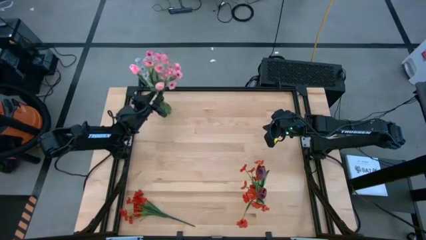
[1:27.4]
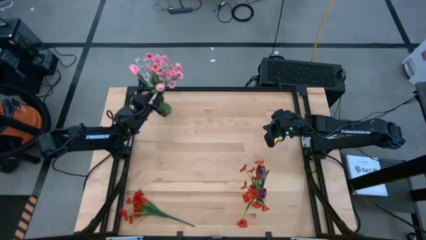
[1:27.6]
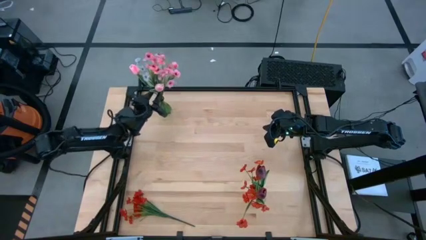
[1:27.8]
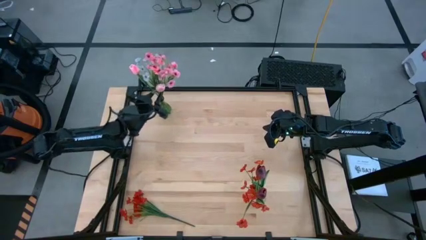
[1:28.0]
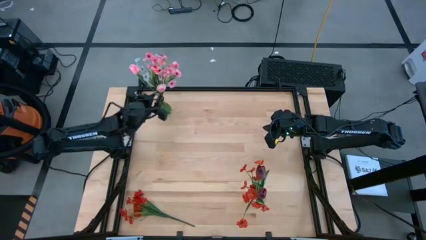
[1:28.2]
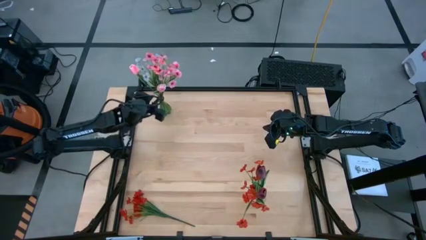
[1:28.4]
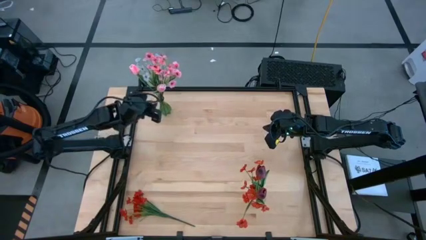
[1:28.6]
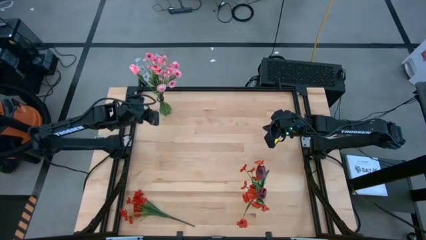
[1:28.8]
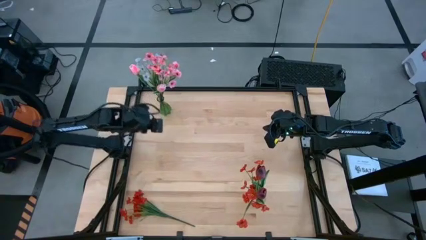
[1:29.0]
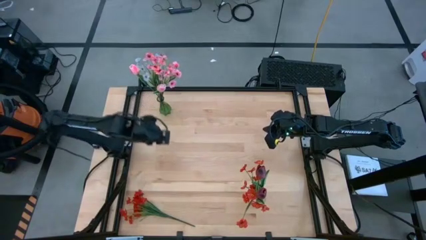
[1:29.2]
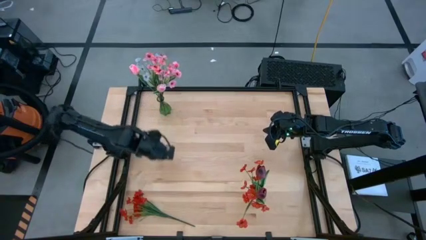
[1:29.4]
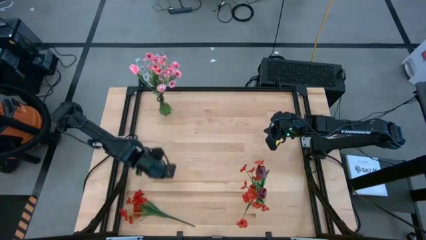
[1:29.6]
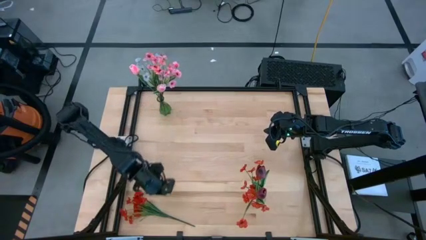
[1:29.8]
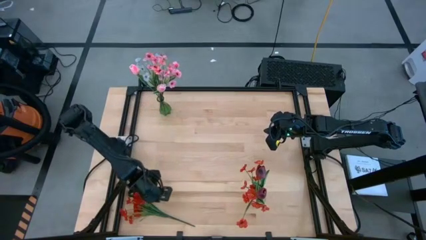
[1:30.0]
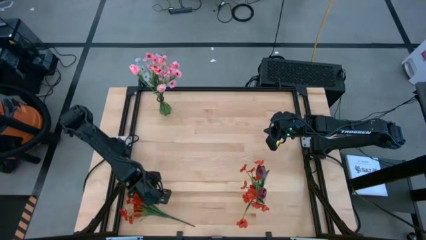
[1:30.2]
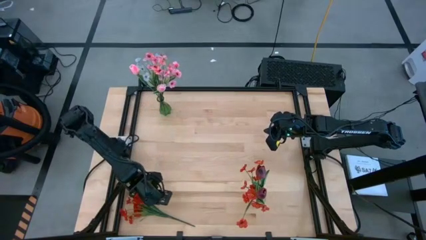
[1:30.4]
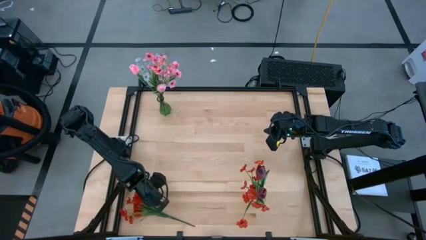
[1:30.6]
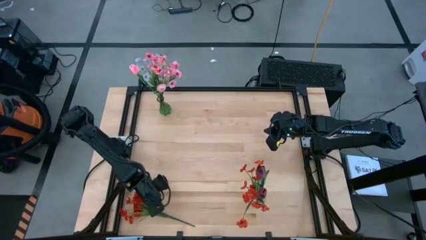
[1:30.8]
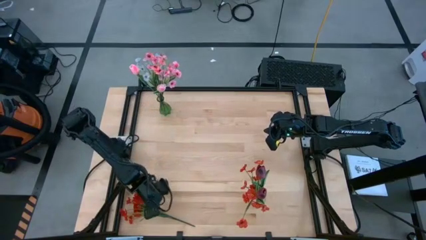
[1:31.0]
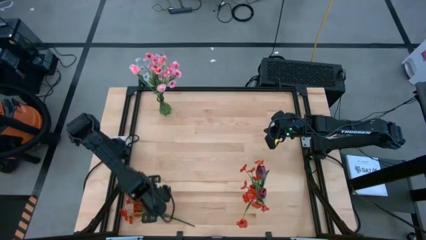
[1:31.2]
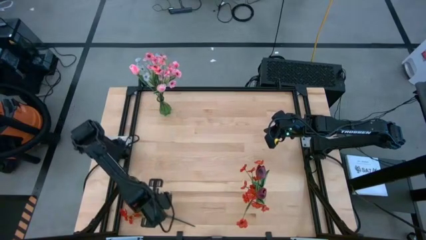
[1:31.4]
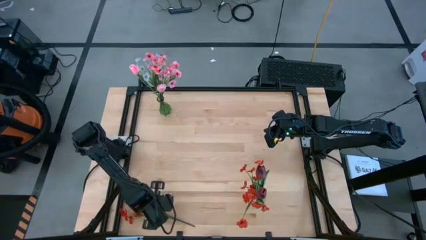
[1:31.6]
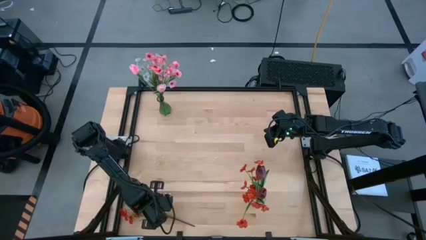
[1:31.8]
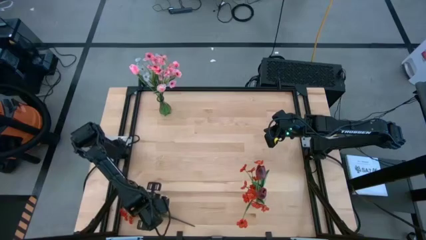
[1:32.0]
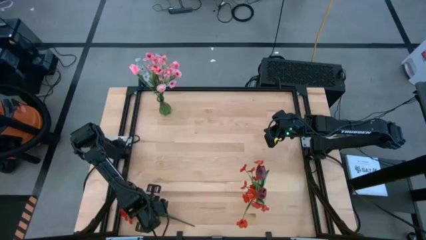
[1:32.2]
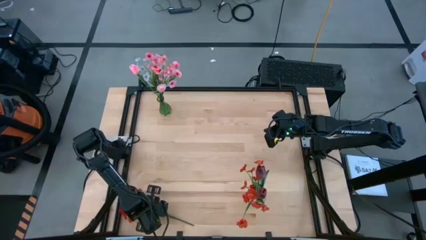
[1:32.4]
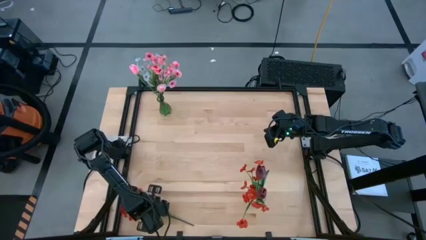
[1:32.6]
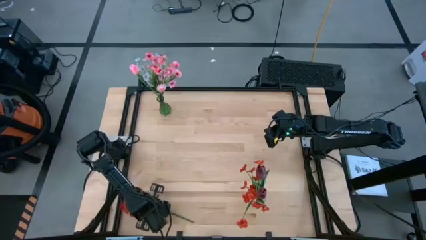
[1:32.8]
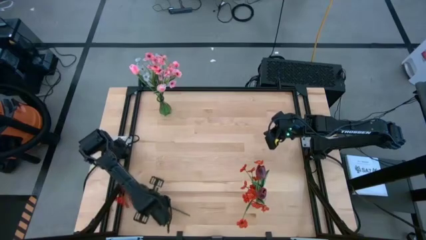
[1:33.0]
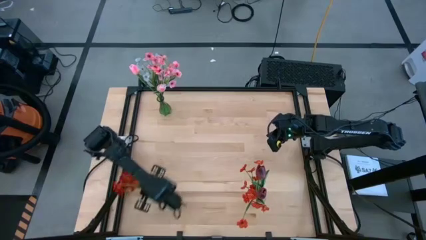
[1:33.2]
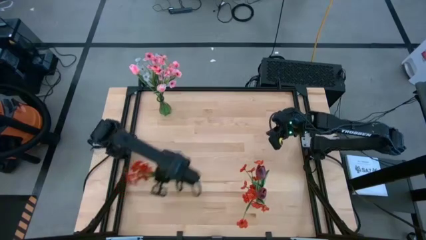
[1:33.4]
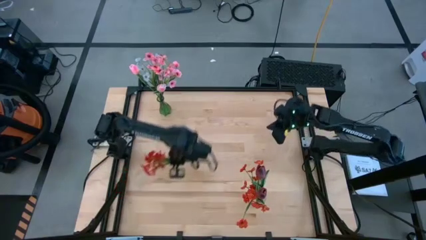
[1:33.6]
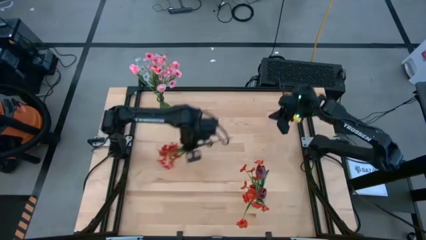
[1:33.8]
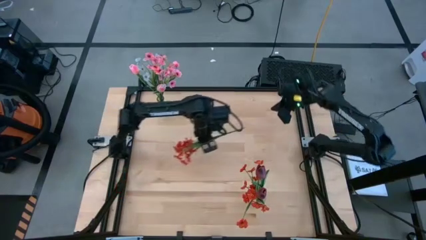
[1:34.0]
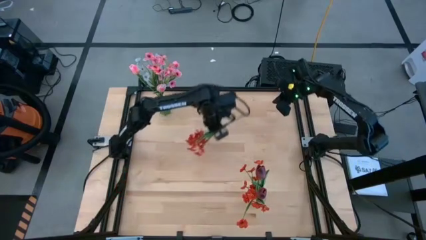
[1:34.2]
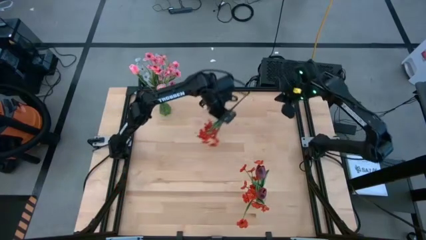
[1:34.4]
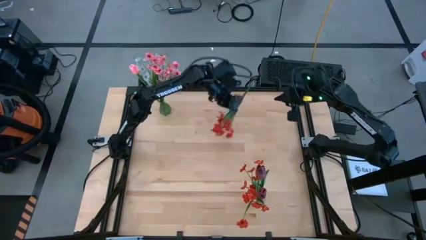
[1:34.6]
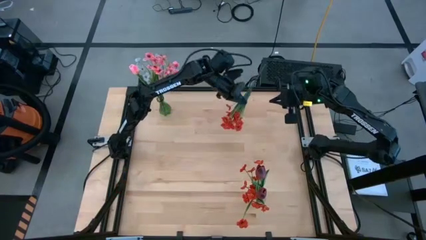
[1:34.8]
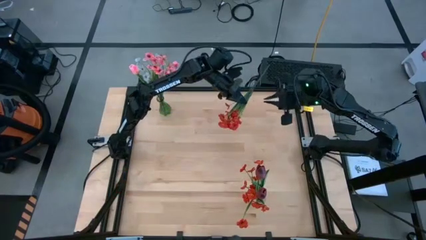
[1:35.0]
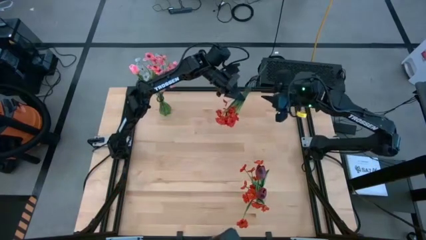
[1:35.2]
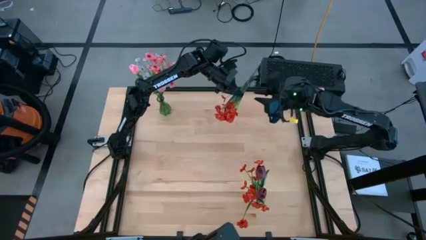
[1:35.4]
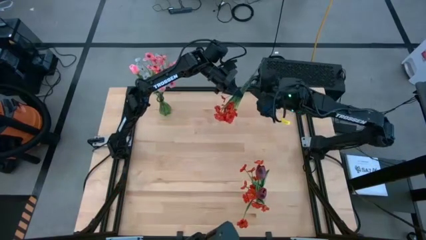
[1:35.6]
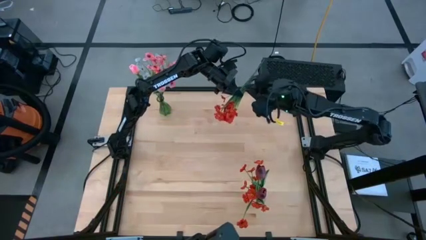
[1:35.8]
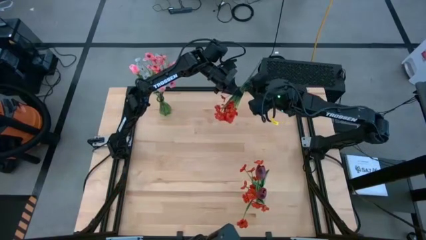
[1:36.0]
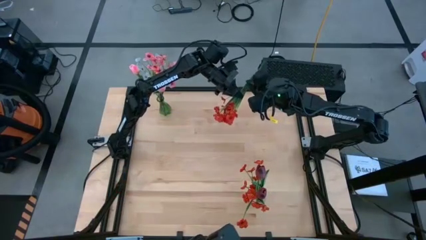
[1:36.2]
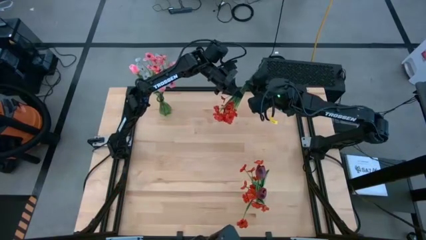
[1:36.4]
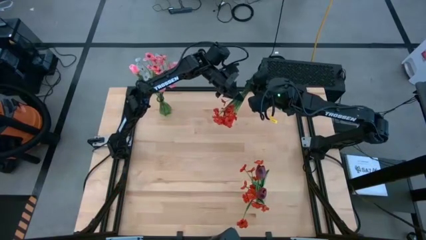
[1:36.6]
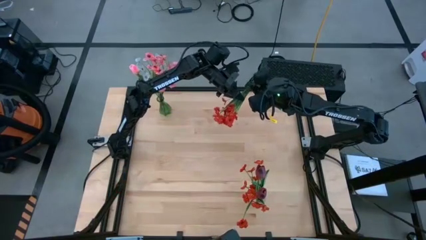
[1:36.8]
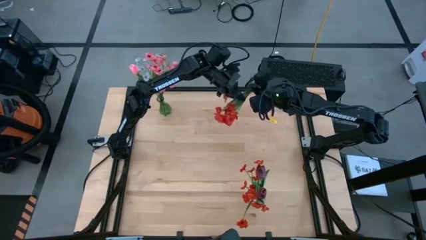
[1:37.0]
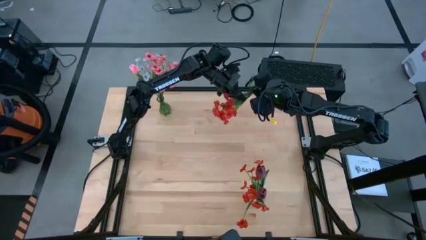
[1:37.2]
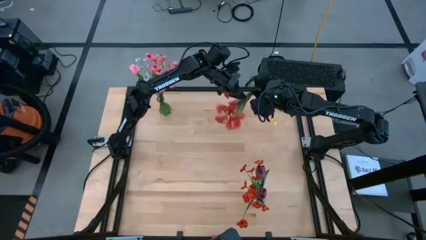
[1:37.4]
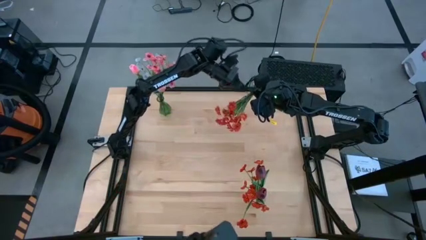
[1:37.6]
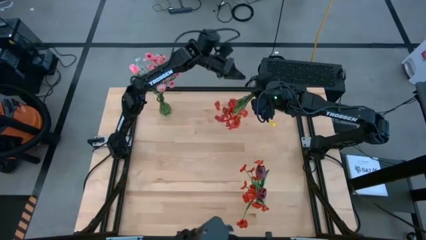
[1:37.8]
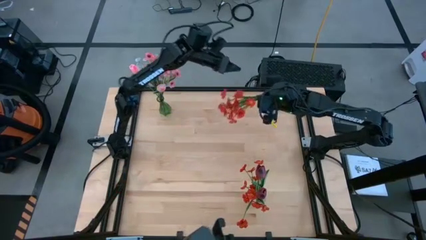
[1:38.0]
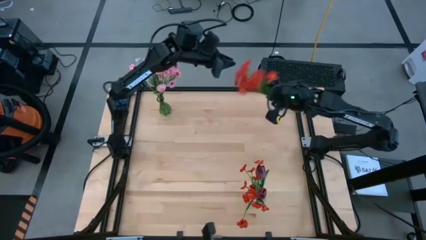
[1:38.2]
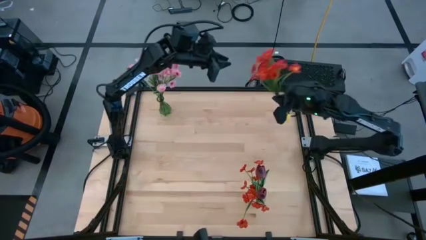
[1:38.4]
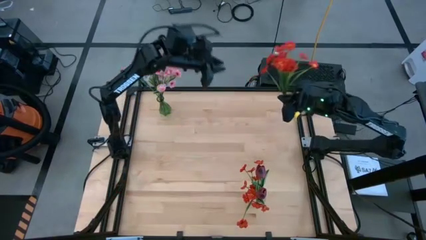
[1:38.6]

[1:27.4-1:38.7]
Task: Sort flowers into vase by color
Put the orange flowers into the transparent vase

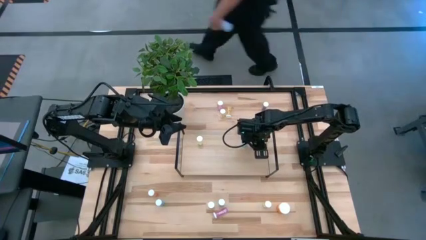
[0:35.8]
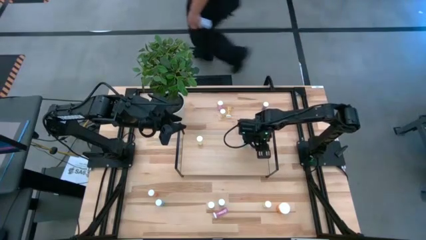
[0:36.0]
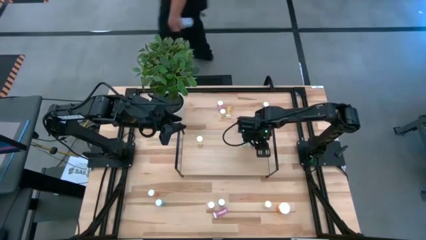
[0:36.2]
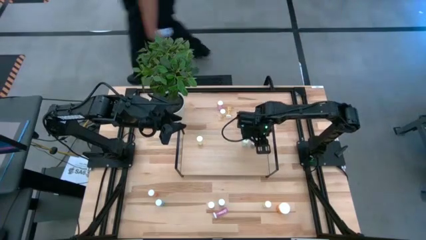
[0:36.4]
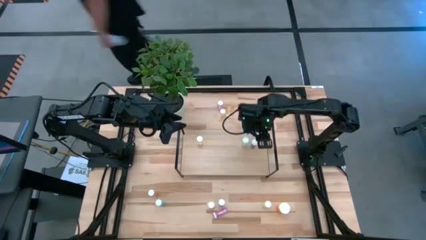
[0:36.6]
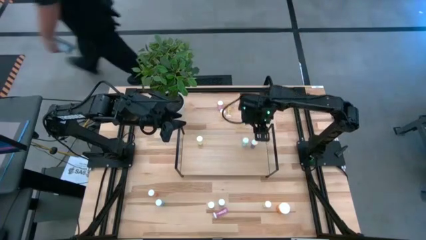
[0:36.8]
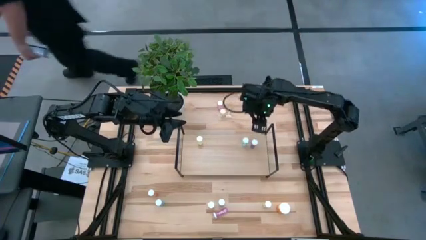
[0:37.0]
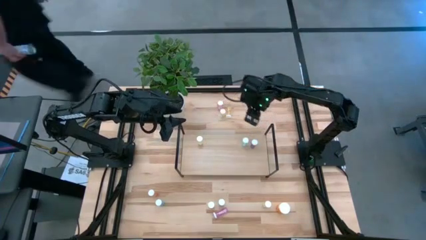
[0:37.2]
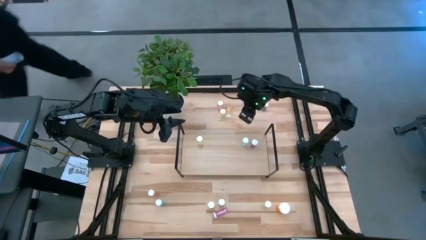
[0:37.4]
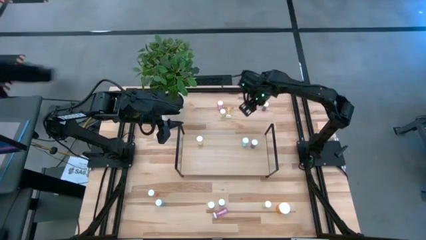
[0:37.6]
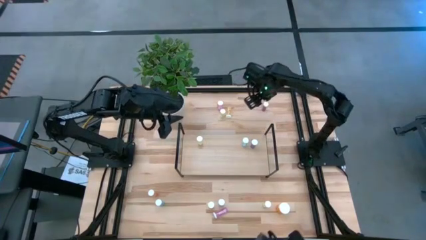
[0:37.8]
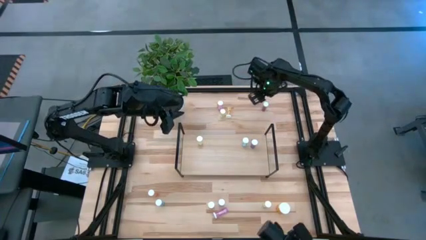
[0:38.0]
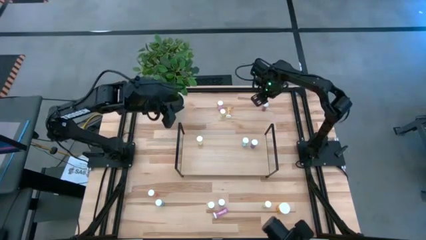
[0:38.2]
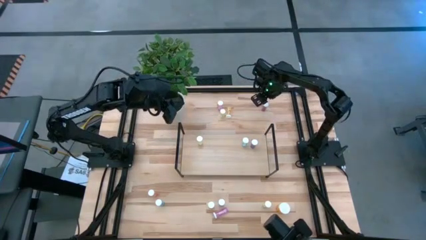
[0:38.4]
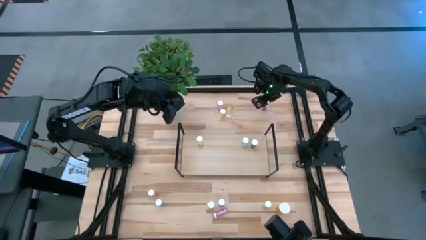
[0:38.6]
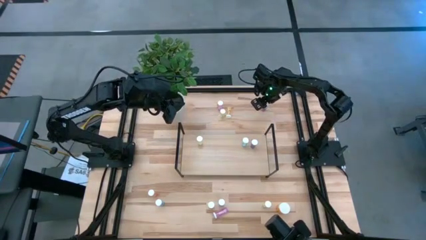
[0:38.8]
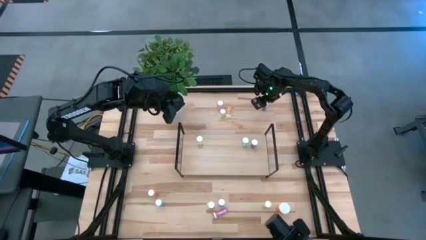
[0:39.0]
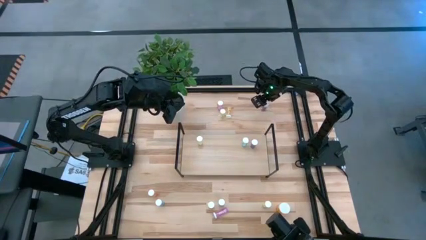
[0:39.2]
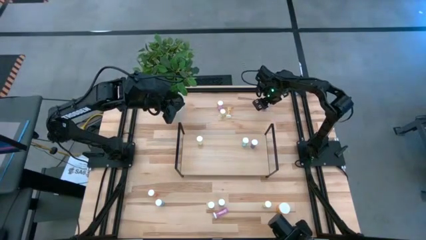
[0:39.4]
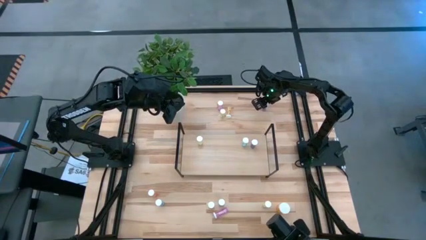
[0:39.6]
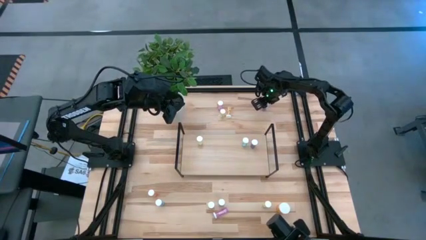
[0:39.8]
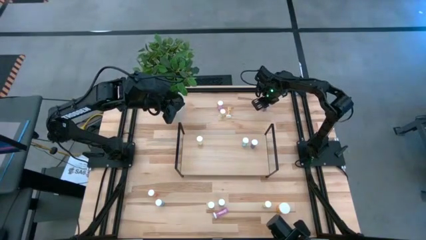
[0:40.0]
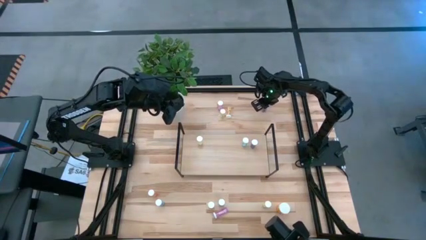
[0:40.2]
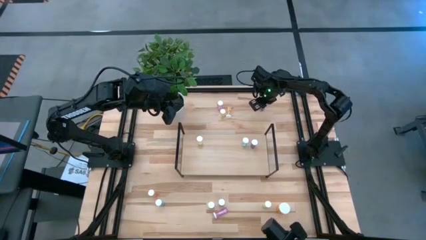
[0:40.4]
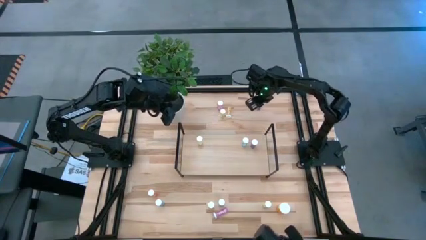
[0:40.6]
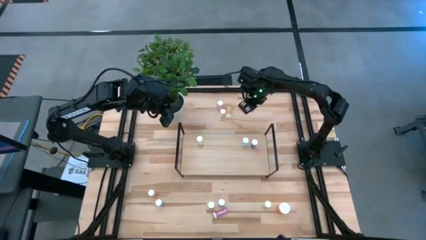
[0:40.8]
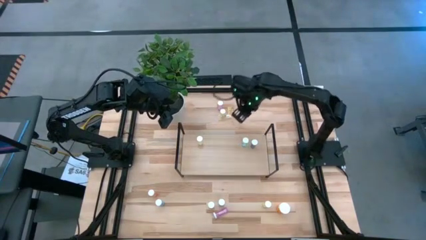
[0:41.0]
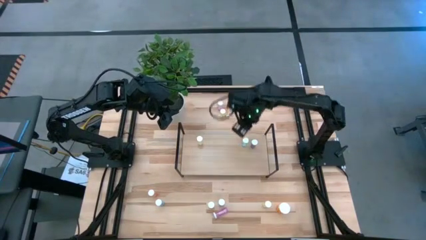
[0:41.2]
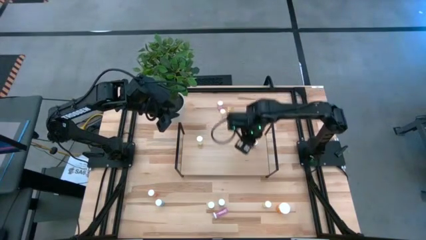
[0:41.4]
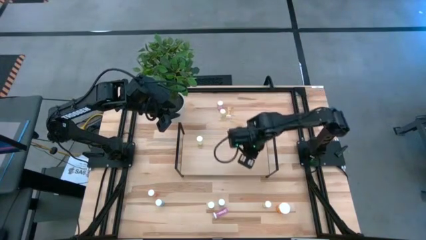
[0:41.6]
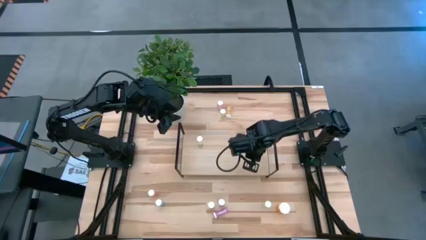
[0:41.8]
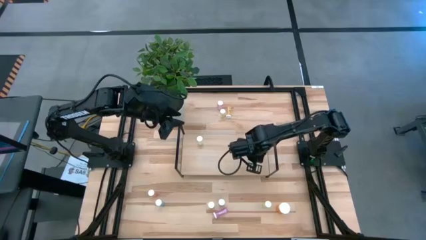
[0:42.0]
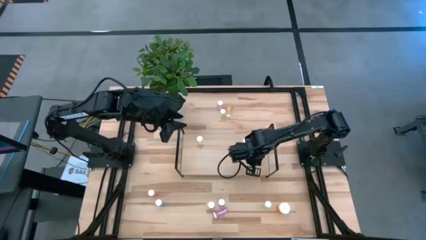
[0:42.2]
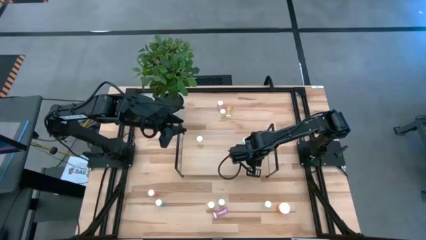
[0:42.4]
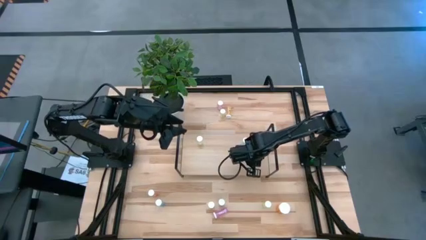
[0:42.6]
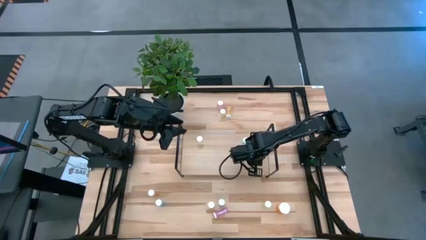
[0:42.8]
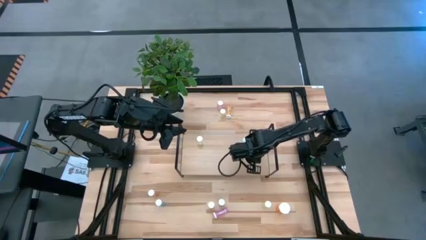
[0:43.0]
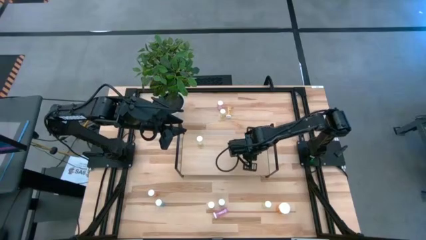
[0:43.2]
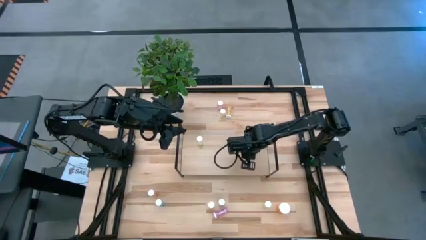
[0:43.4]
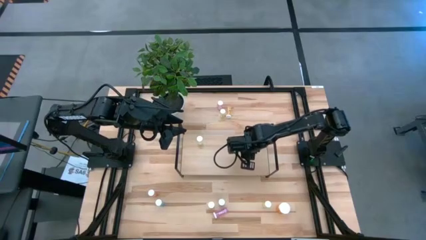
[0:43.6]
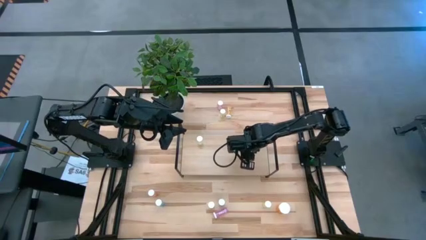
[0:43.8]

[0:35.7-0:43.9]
Task: Pick and place medicine bottles onto shelf by color
Put the blue pill bottle on the shelf
